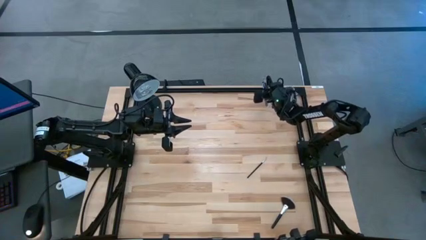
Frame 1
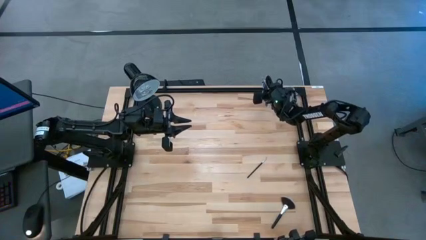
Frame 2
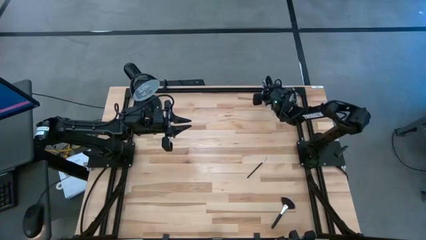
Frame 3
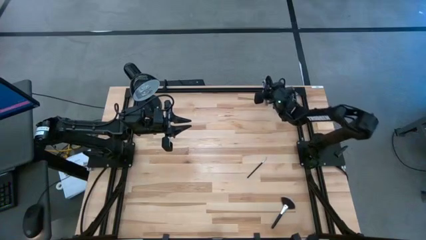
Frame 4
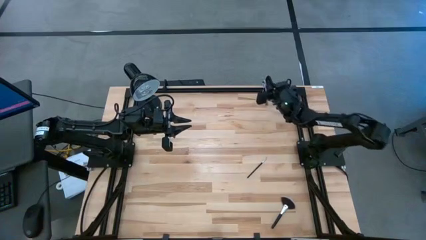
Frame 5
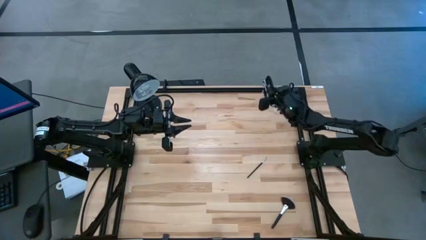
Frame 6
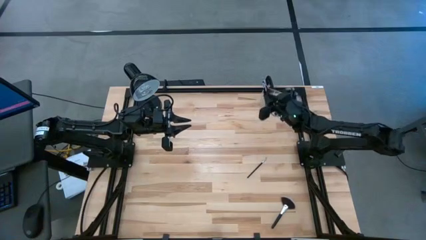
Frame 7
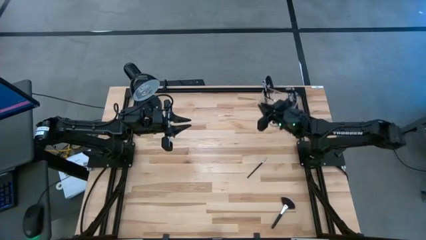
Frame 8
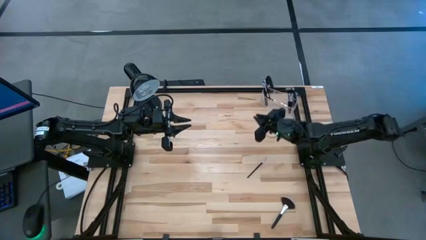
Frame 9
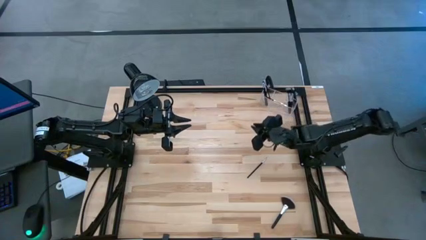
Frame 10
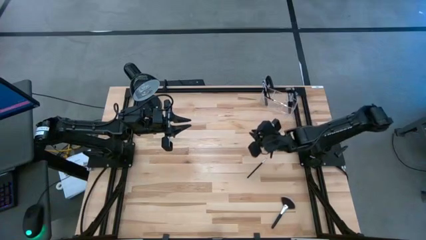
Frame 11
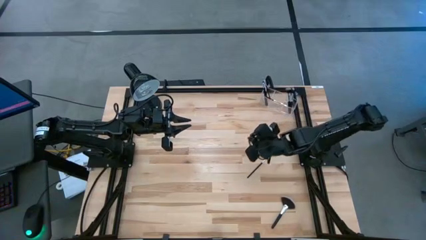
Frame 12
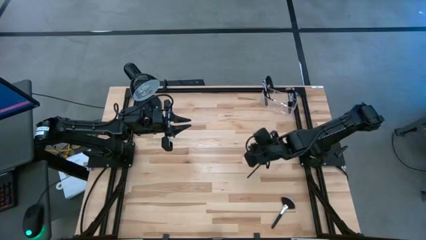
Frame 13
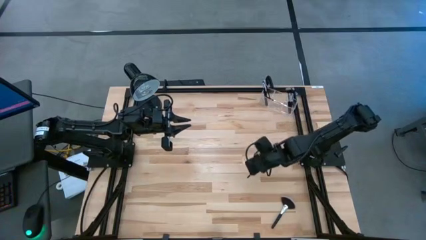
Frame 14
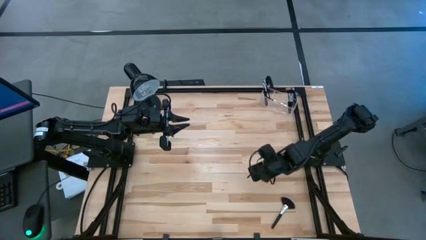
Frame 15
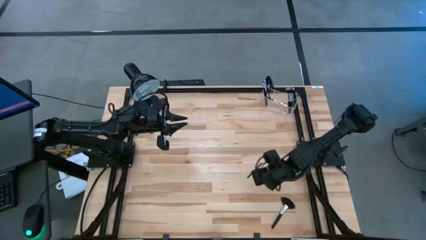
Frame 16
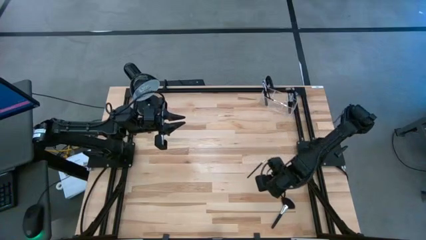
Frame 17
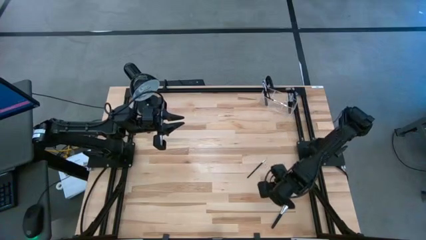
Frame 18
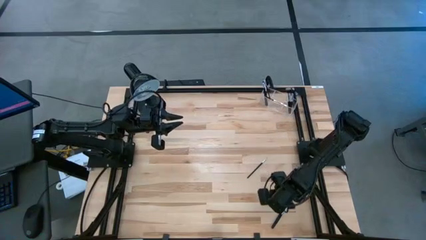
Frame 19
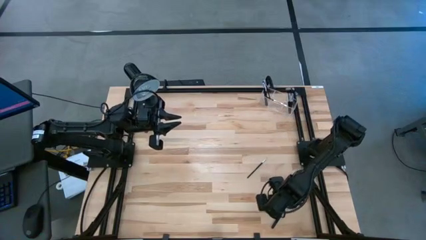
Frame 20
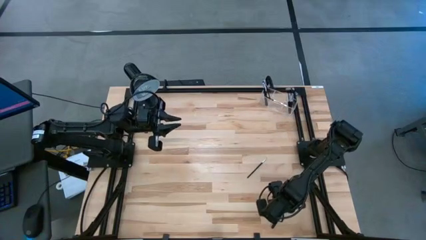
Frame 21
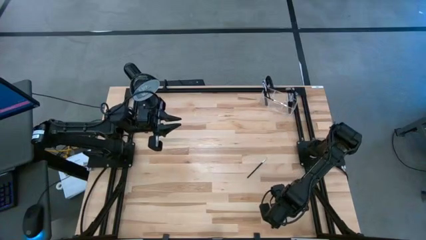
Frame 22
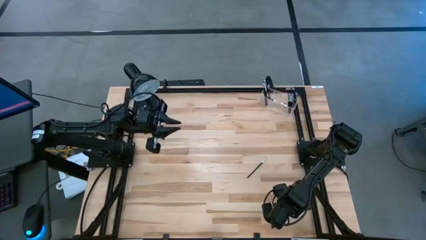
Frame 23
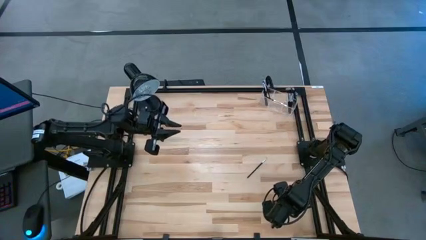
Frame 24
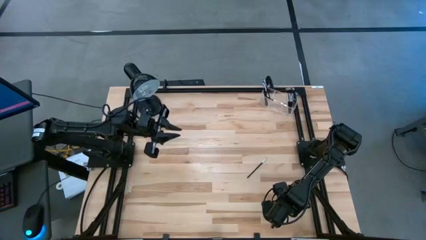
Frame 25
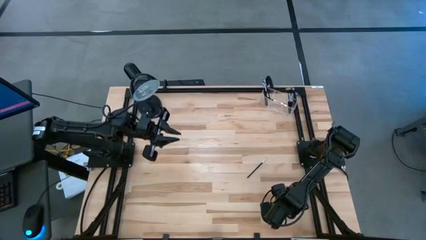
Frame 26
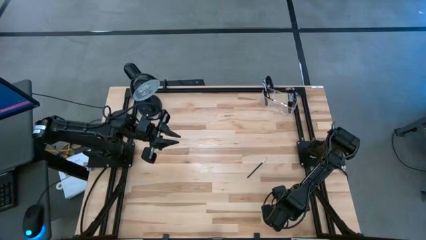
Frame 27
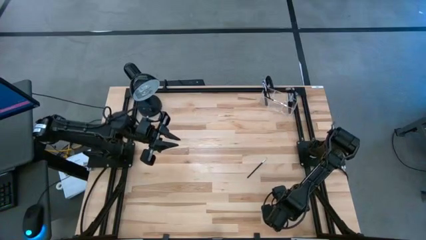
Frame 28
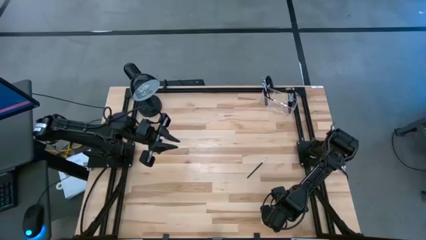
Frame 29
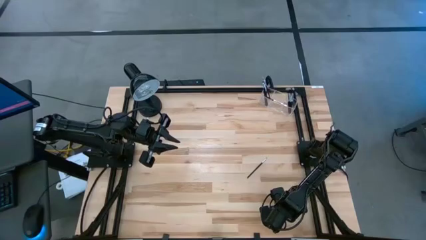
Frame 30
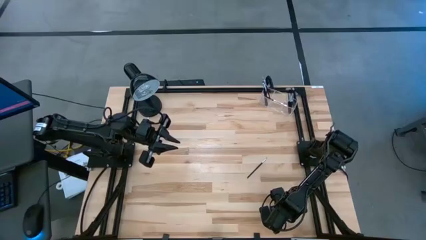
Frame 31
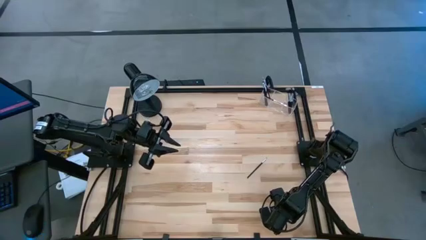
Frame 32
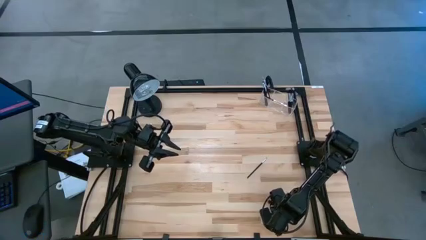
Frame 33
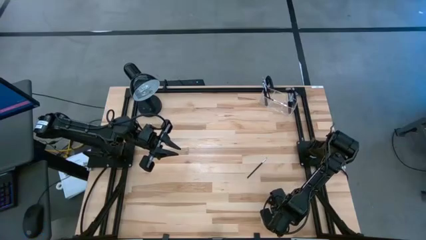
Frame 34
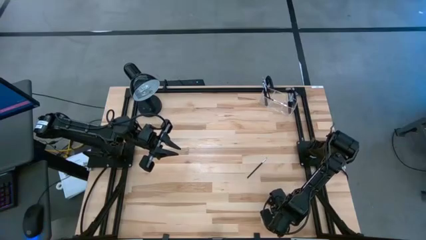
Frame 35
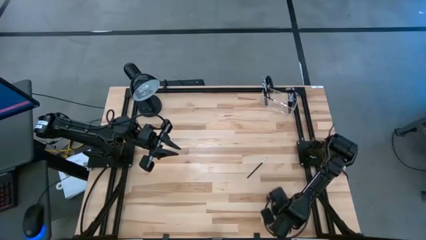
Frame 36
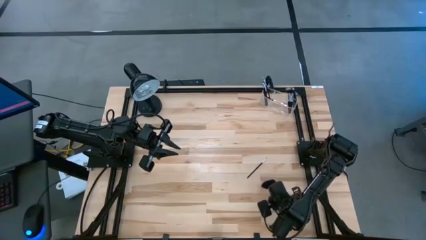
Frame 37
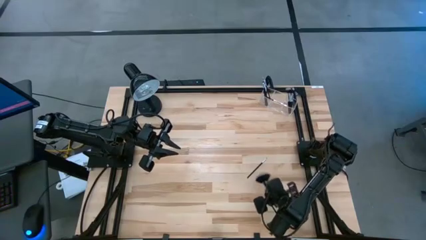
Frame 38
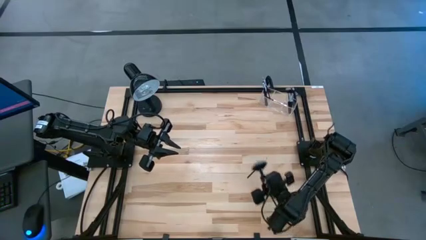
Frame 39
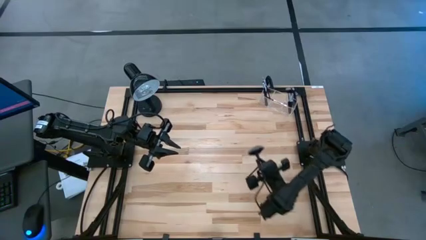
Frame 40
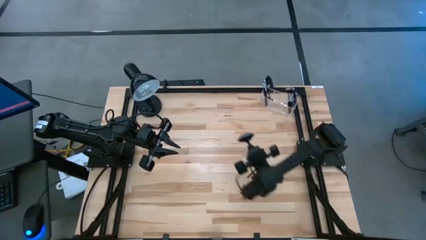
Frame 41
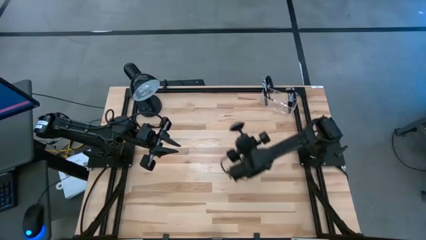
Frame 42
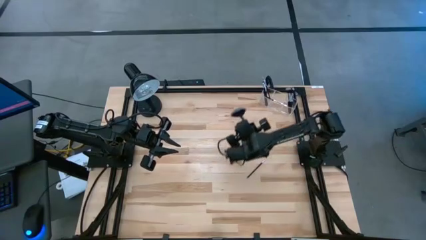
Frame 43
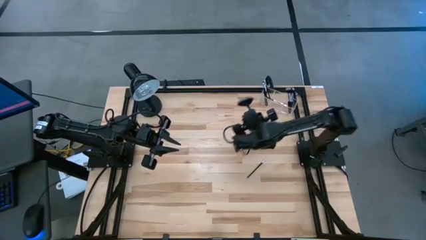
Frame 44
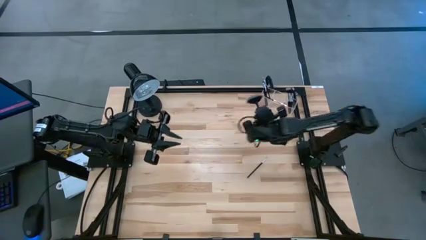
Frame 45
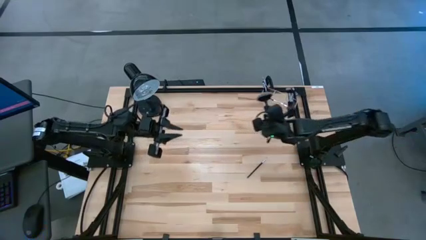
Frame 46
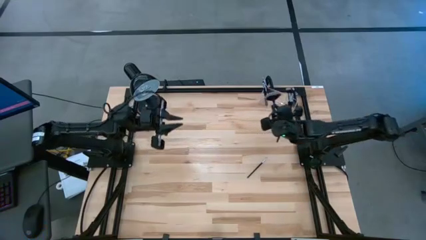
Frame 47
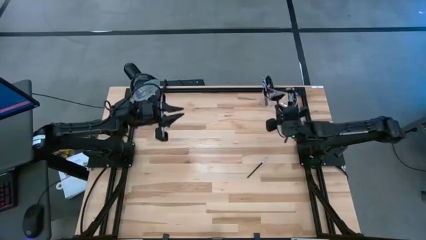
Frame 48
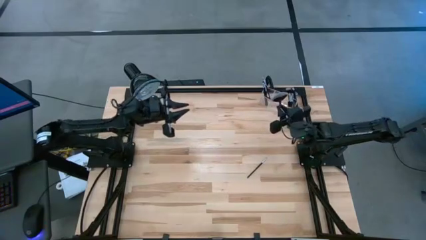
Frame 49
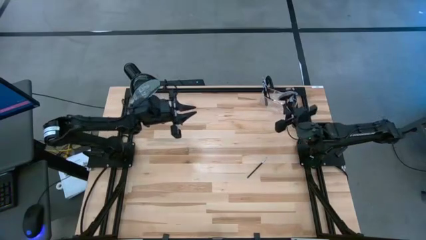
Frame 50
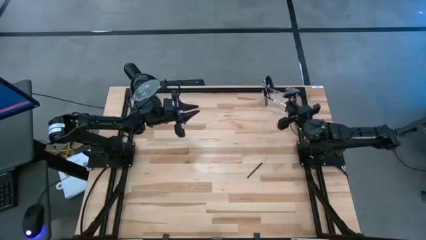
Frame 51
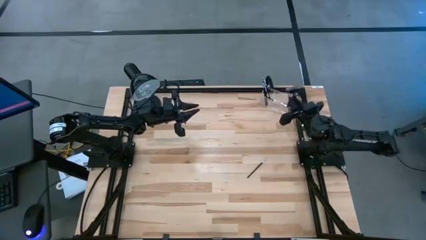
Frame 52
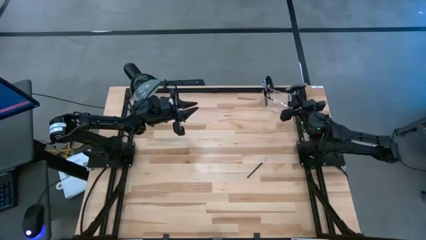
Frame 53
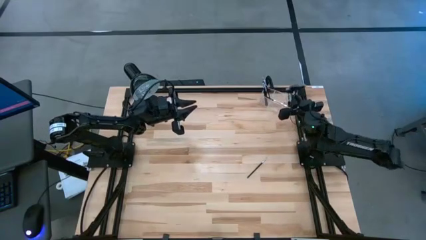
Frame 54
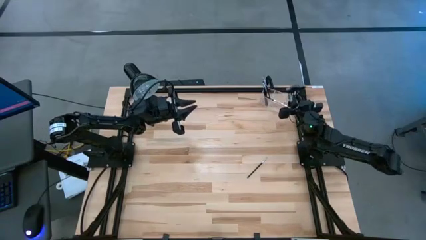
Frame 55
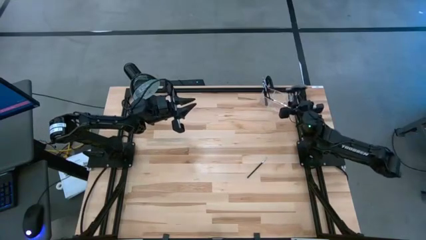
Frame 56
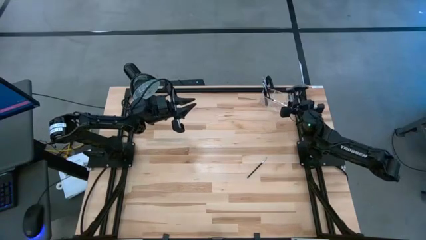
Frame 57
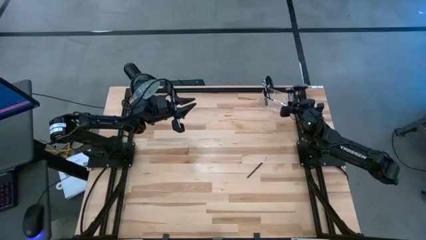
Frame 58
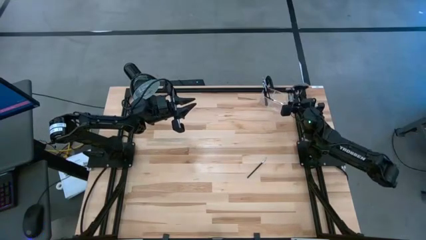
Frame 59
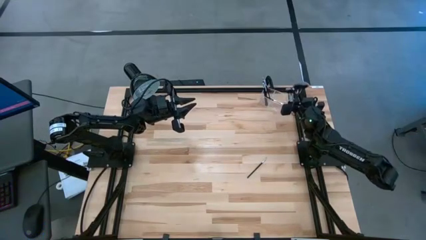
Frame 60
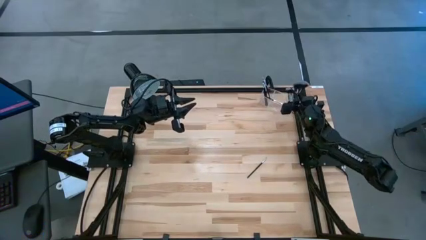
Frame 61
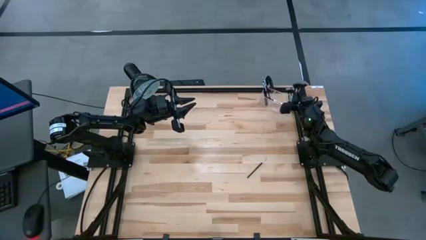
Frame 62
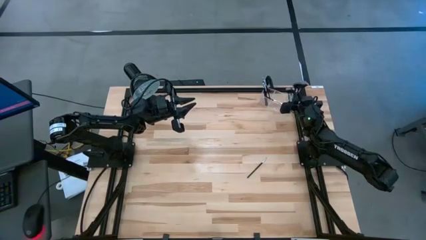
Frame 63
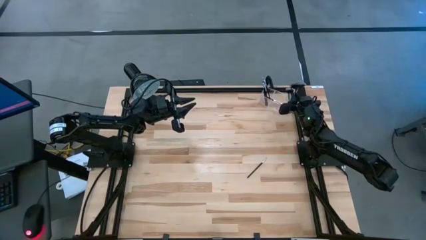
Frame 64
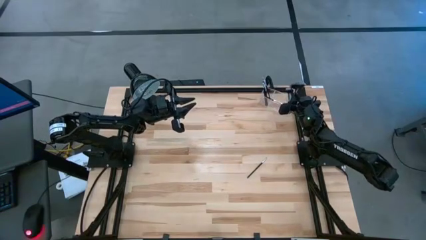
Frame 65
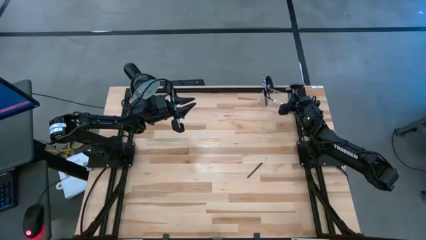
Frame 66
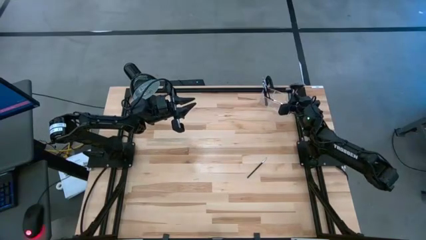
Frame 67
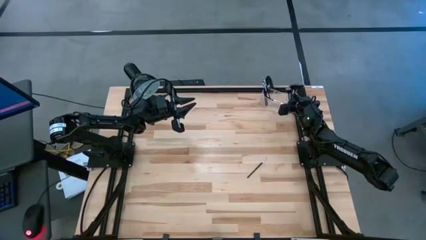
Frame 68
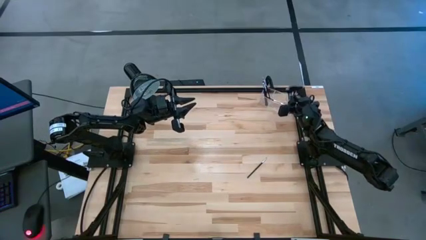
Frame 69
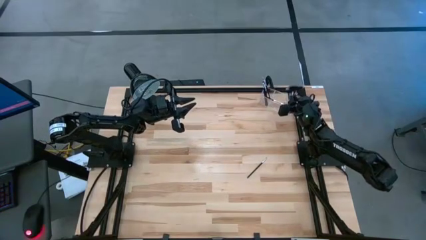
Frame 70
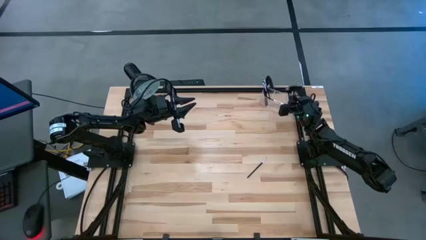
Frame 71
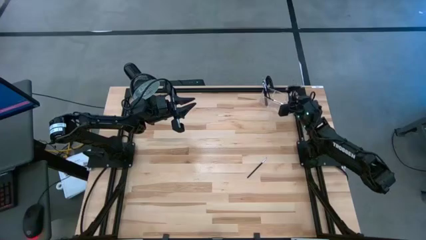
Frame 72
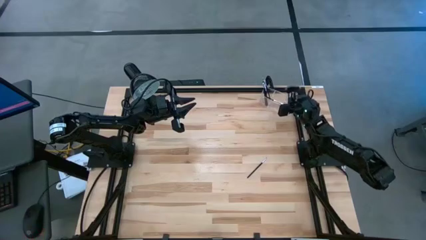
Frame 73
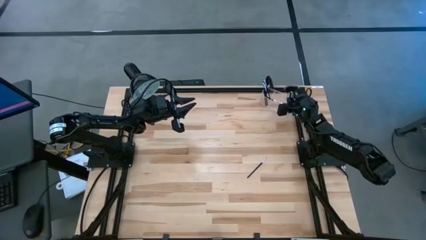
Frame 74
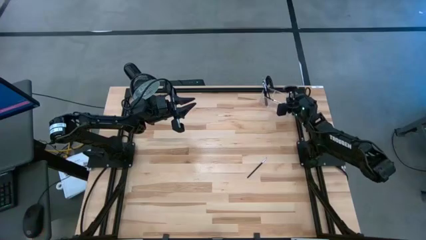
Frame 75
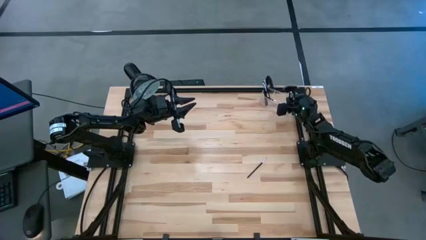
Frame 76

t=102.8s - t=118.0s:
Task: Sort items
Put the highlighter brush into the transparent organizer
